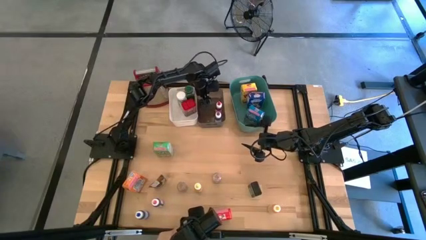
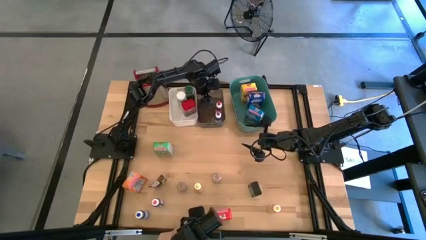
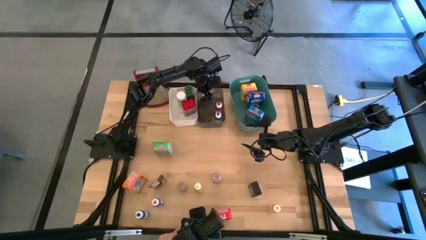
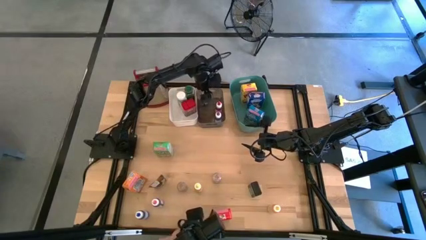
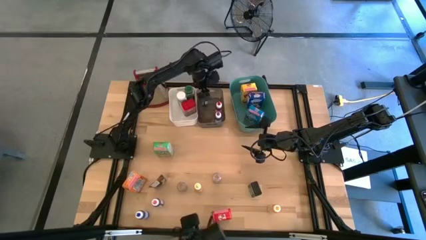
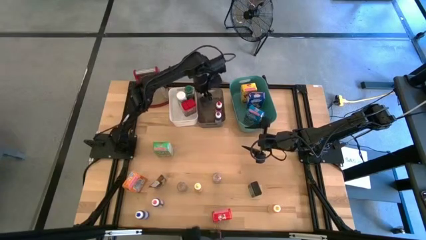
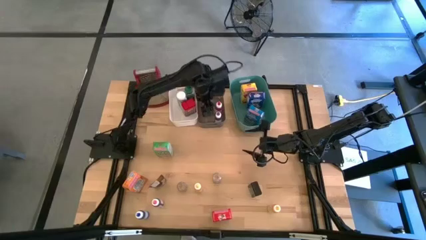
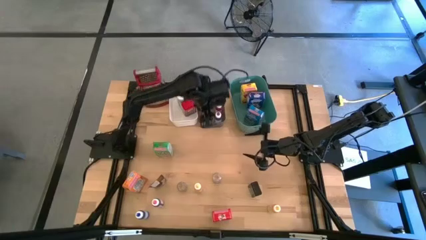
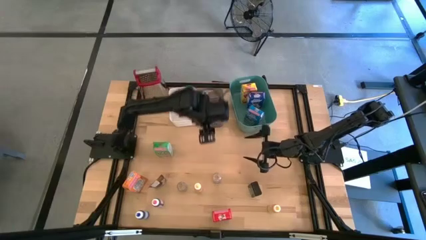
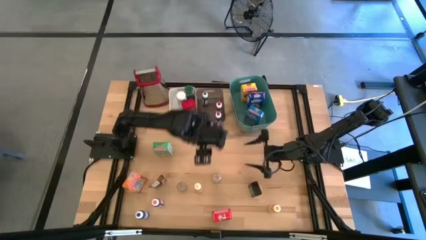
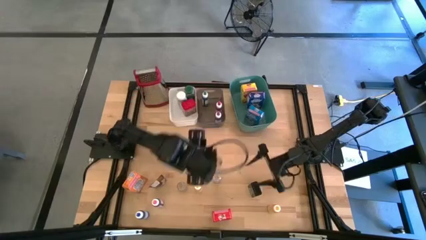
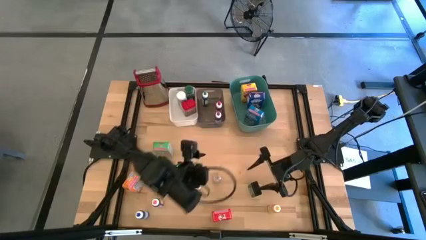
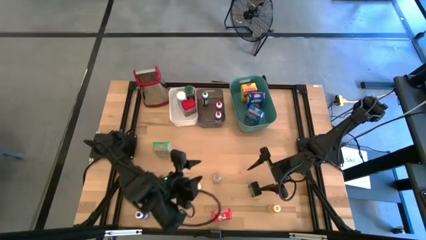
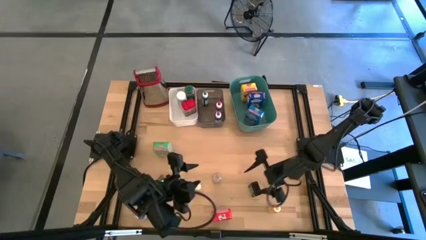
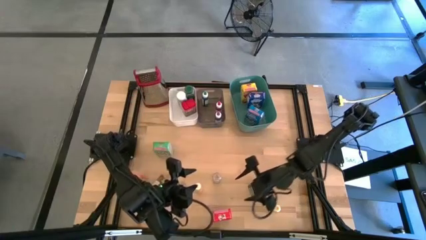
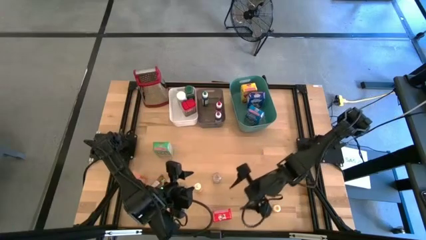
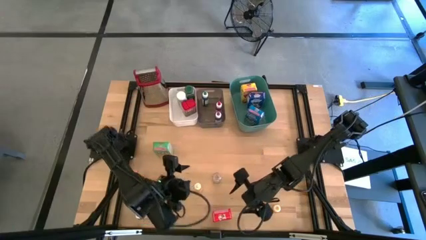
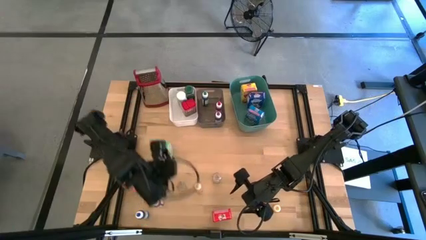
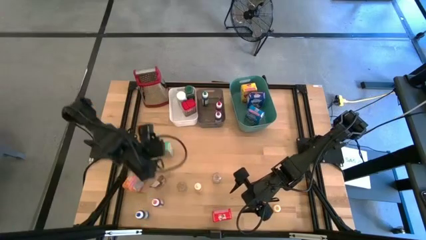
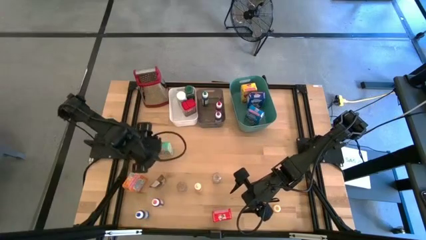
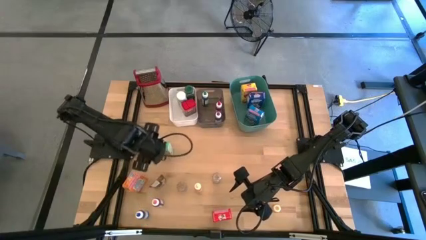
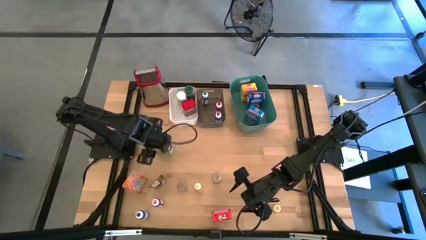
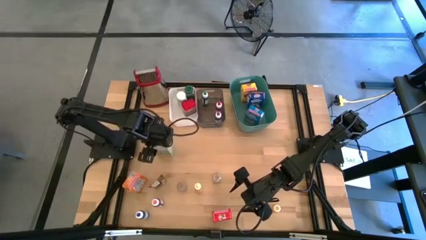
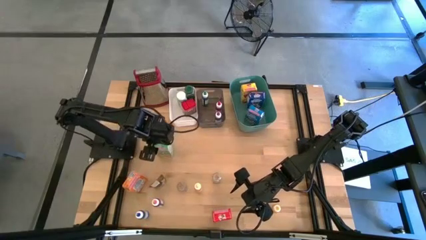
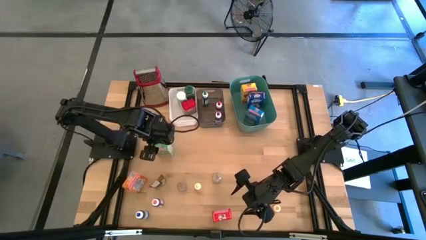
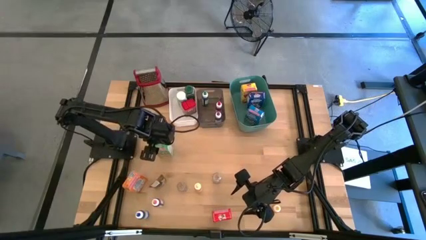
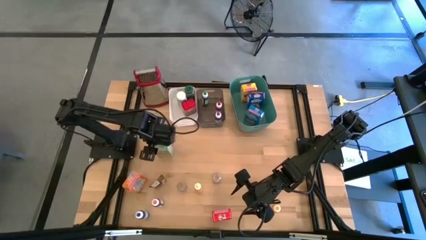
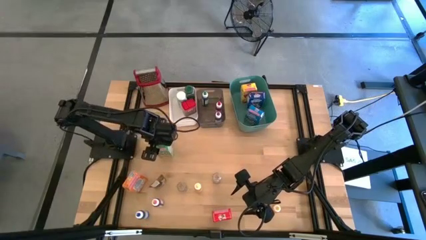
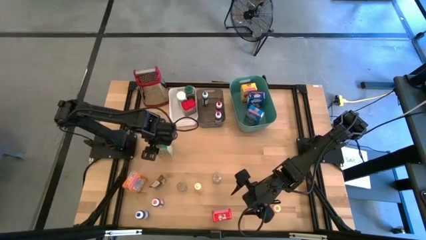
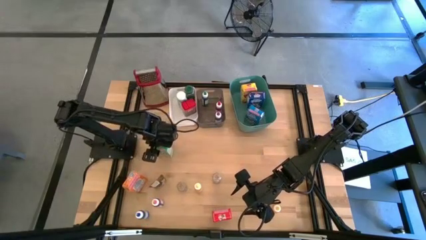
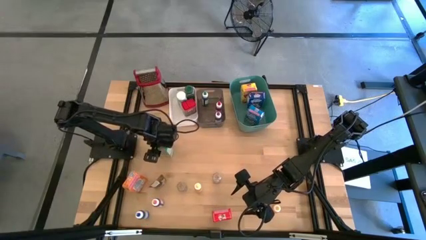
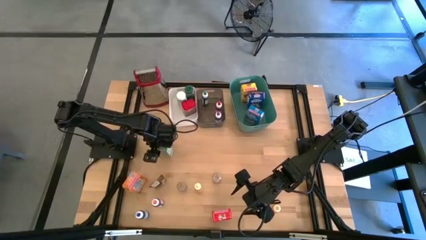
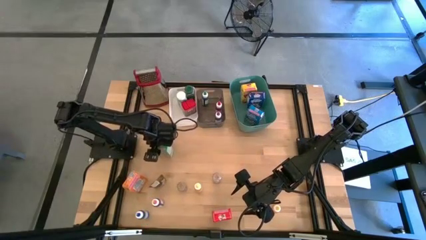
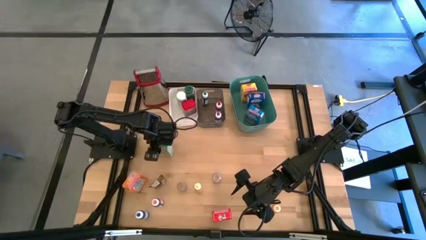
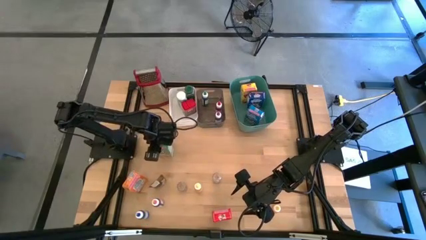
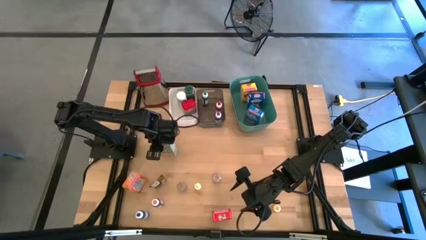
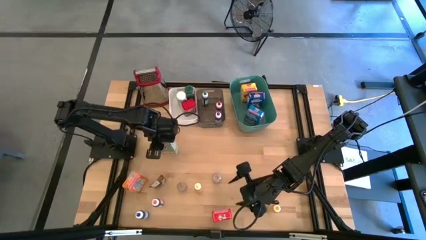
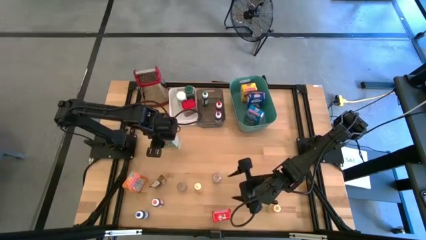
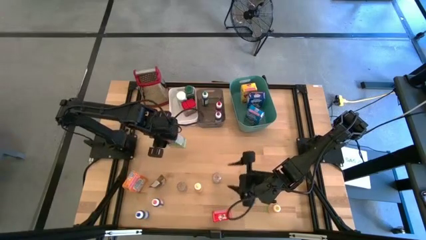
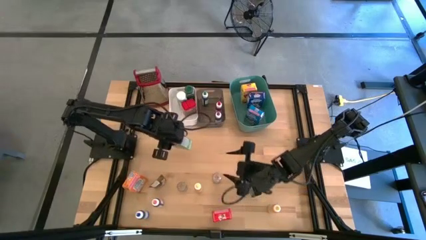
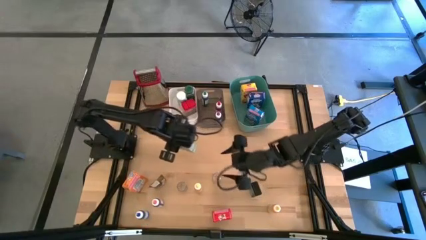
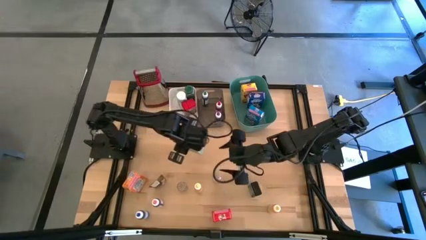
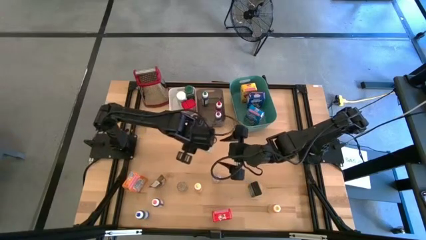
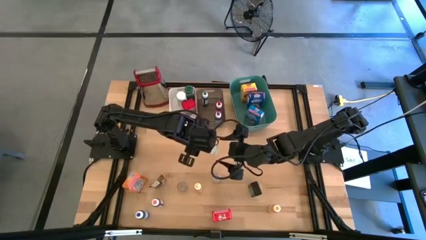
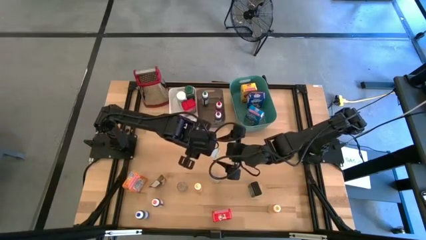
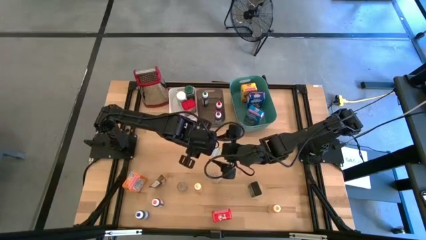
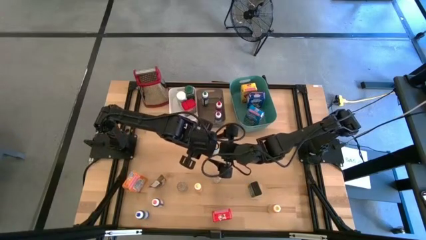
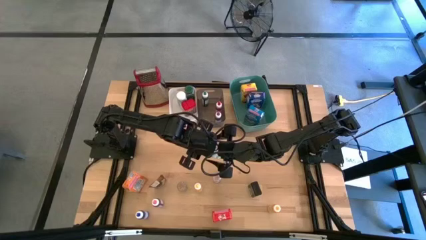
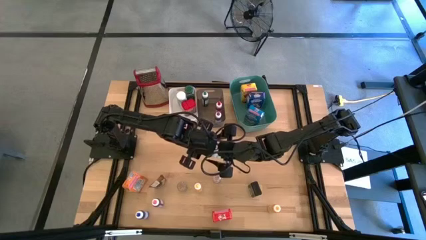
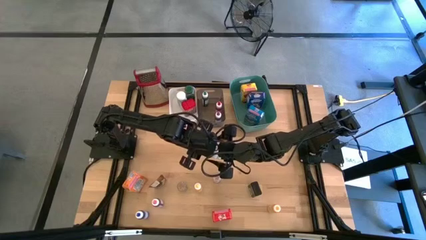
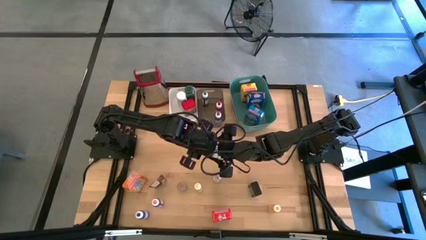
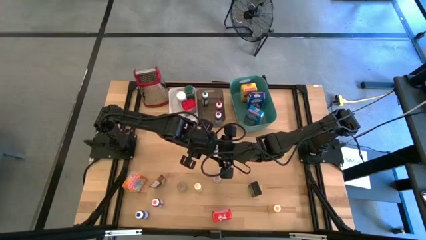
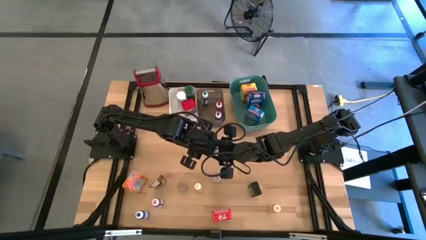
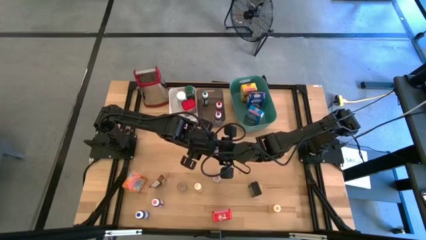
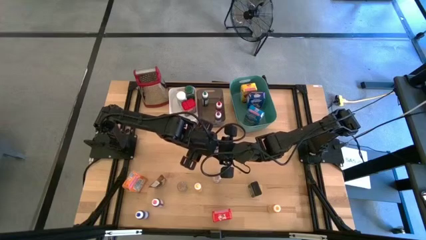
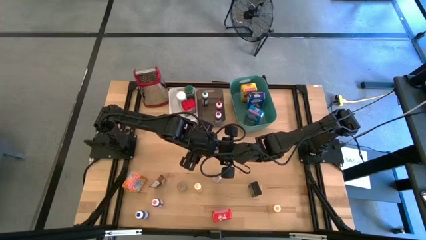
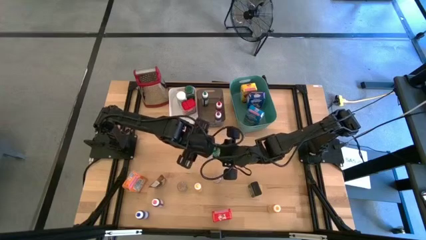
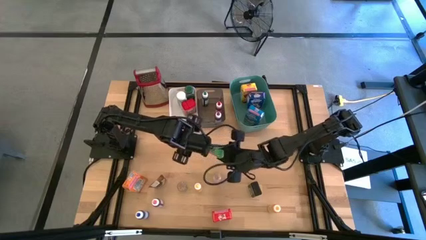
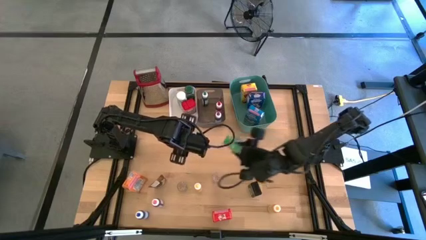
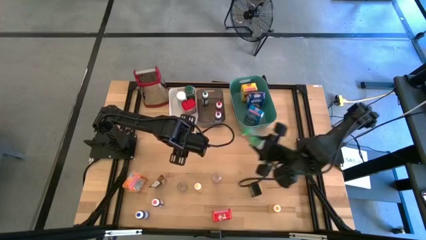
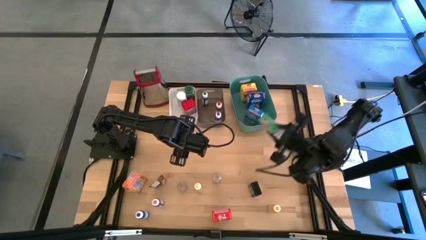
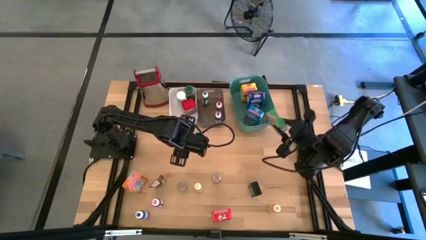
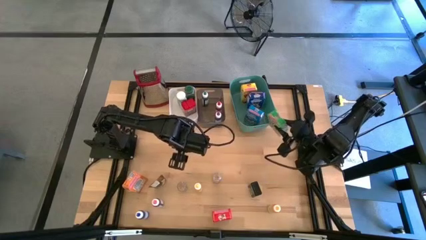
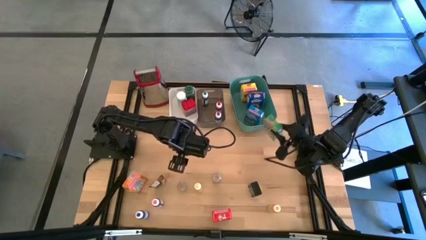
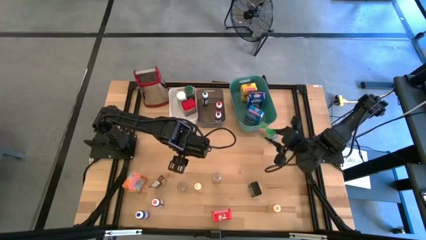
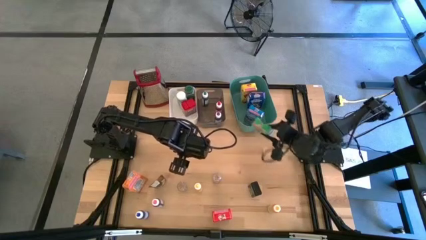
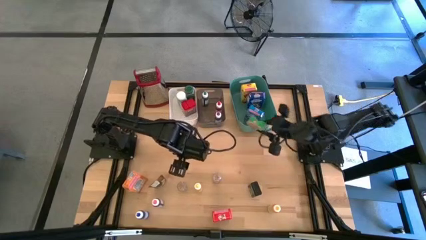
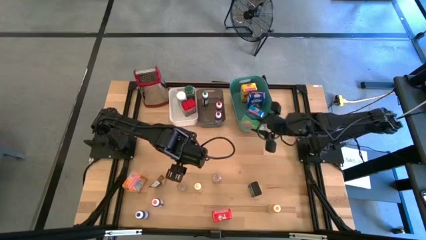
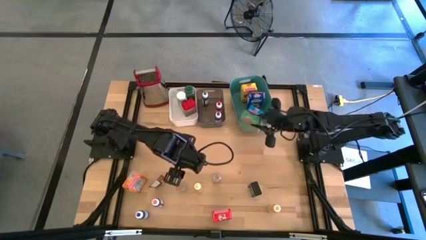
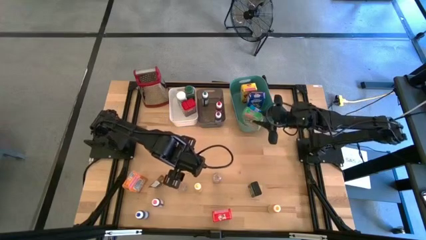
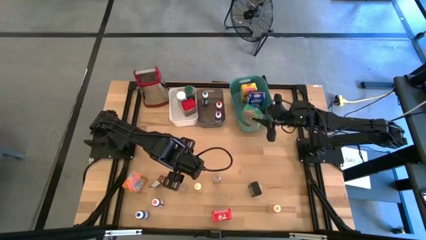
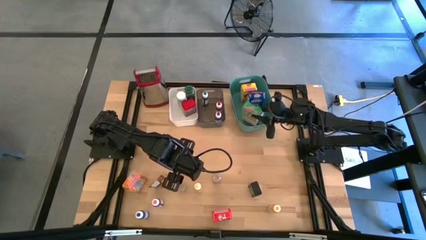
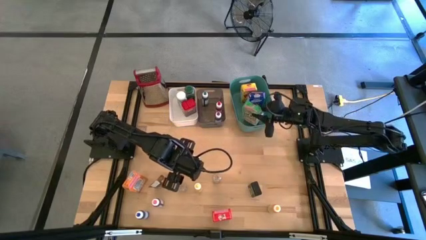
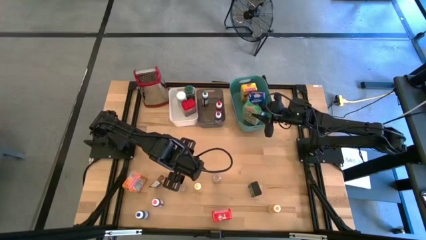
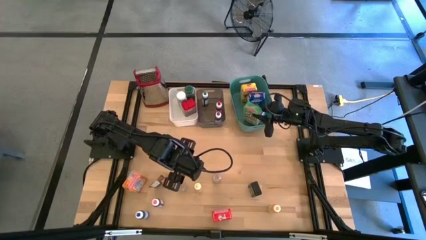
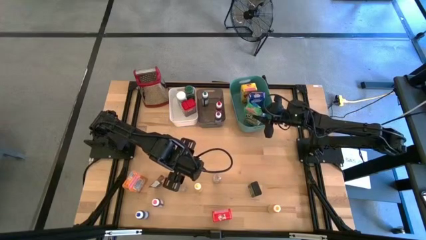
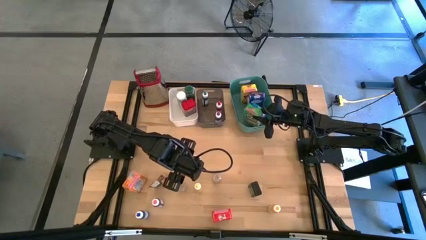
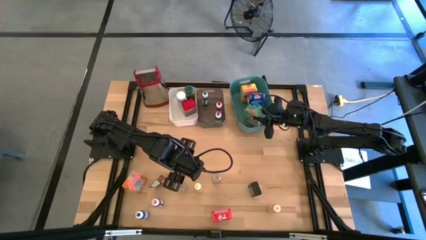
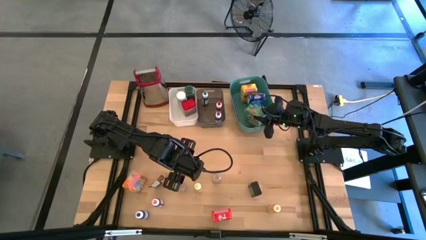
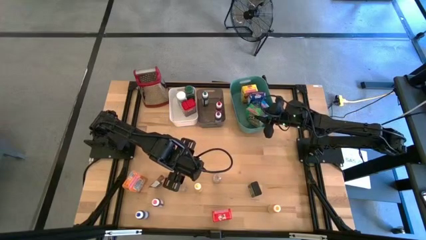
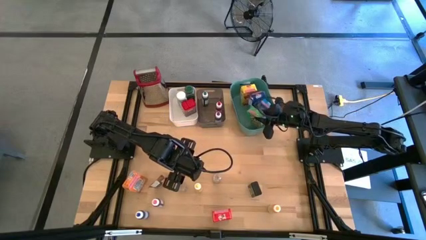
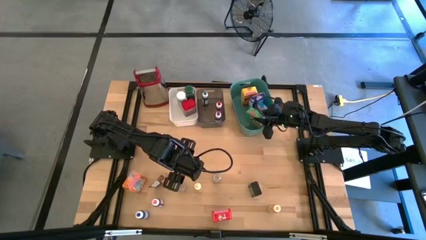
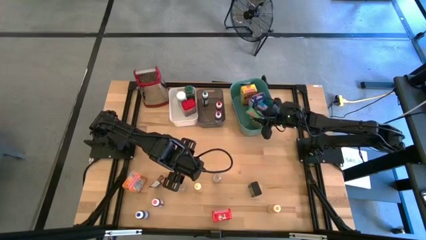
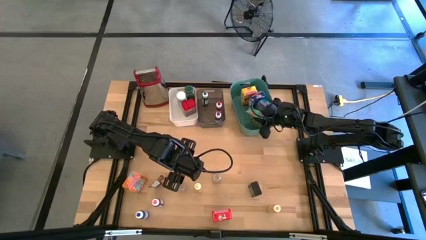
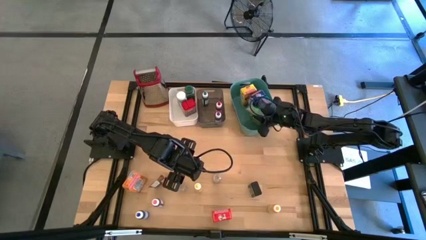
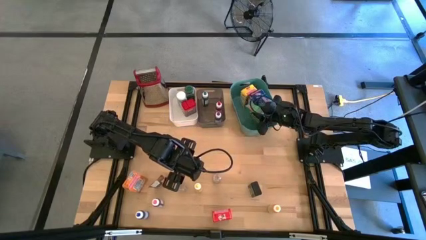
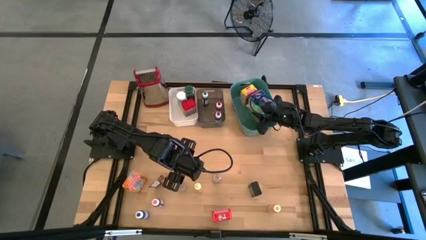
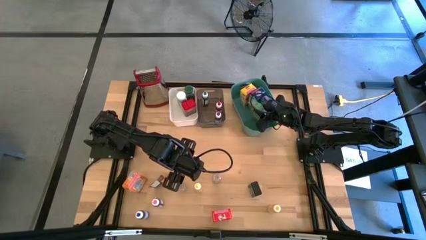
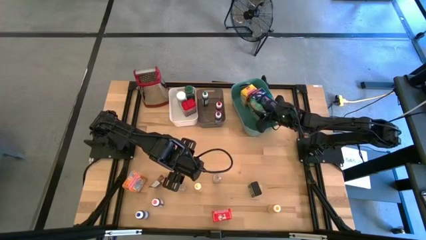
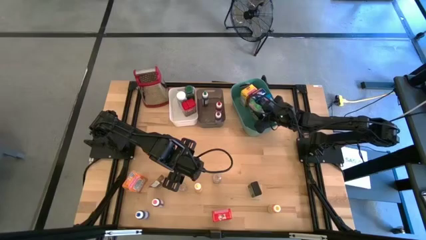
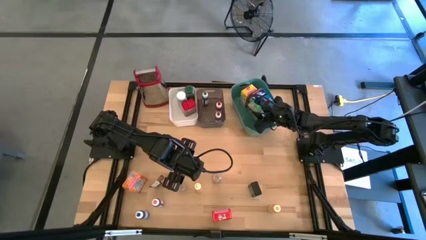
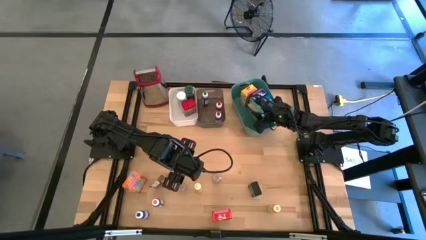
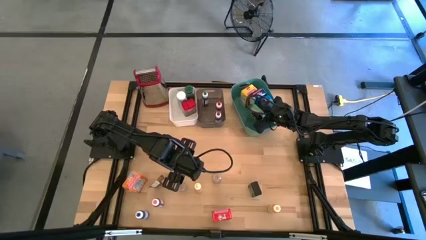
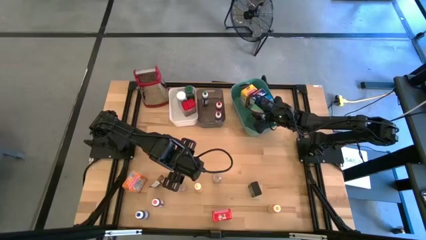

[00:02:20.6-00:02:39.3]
Task: Pick & Place Kitchen Items
Put the green cereal box into the right green bin
